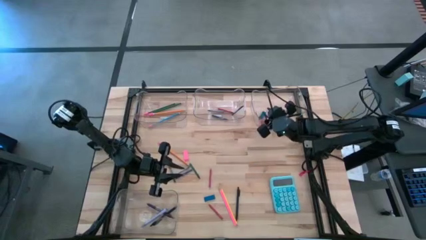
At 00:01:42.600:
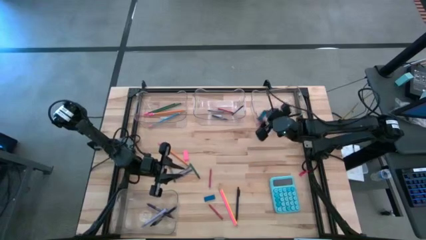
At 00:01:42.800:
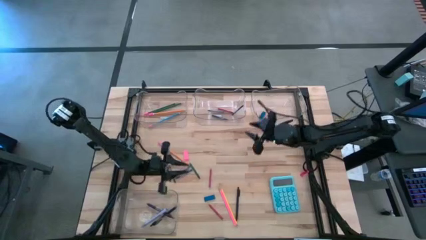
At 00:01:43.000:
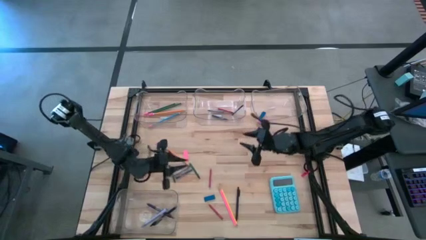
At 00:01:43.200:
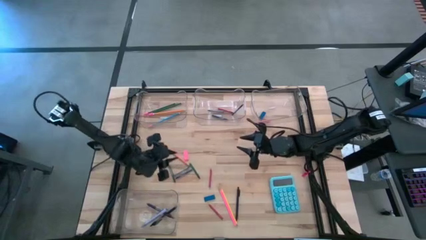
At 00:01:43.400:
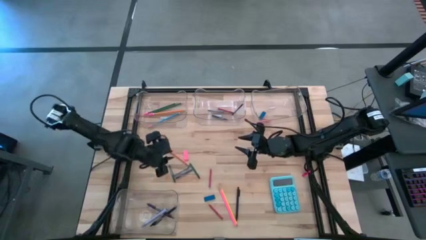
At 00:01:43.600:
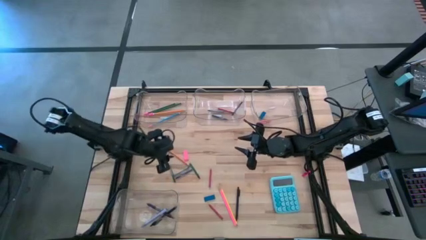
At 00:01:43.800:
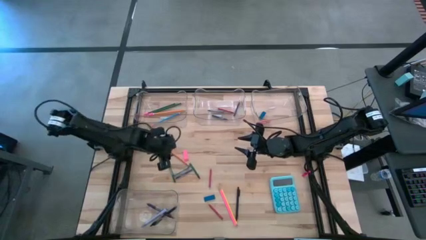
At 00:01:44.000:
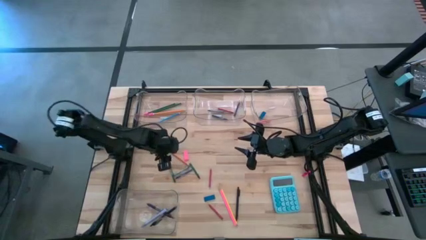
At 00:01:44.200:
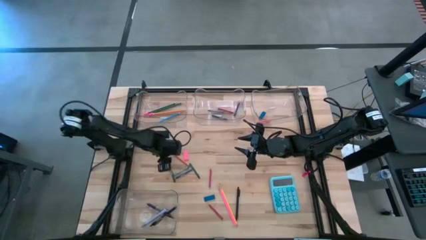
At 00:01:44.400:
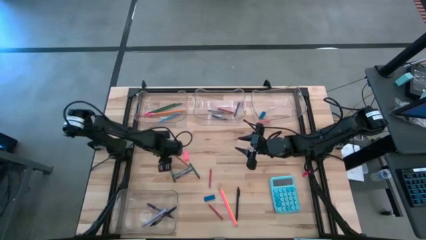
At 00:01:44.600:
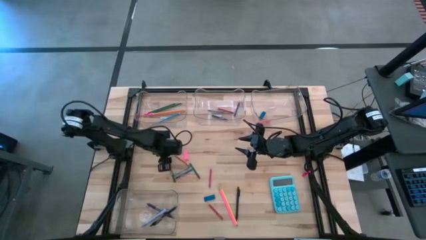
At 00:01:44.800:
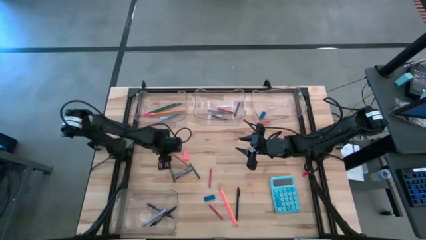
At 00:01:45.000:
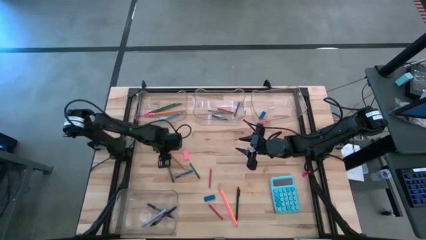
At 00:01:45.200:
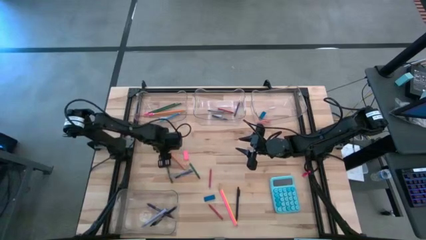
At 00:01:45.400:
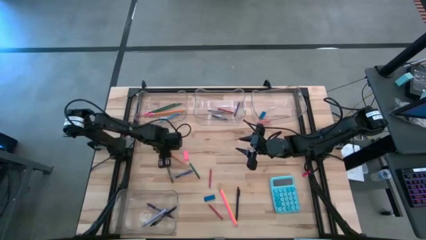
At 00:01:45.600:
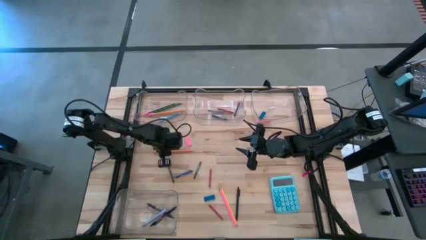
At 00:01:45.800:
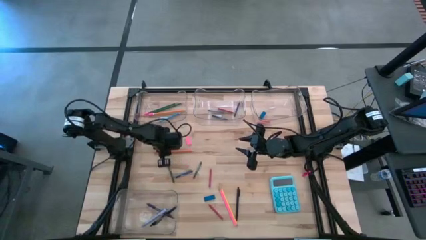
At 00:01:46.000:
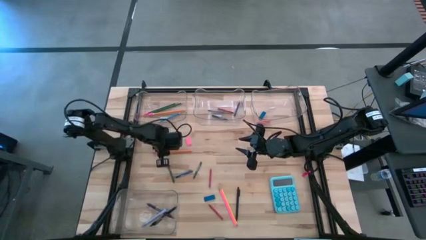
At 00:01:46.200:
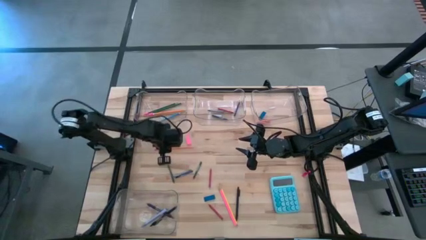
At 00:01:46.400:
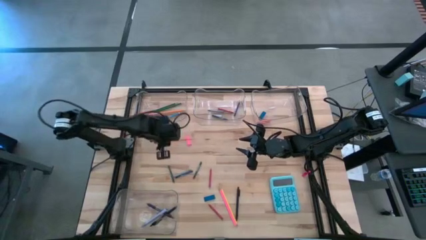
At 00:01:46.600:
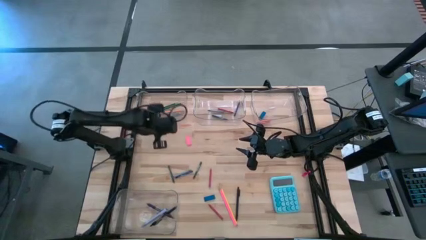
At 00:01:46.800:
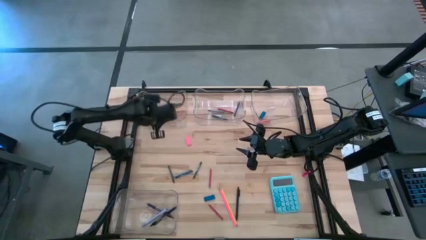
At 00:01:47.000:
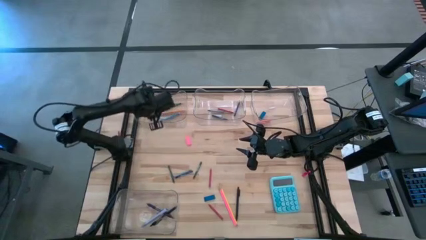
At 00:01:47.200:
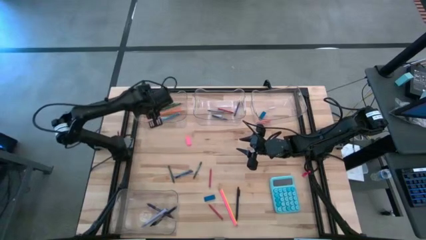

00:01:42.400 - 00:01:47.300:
Task: Sort crayons/erasers/pens/pencils in bins
Put the orange pencil into the top left transparent bin

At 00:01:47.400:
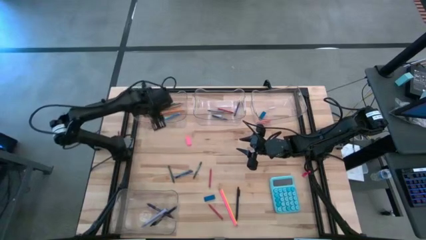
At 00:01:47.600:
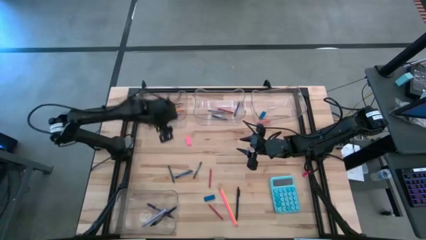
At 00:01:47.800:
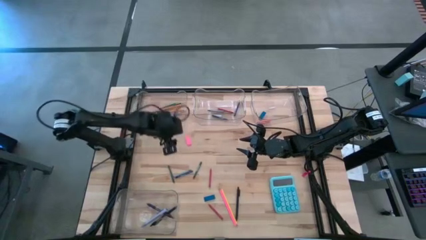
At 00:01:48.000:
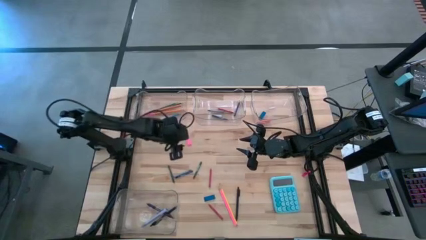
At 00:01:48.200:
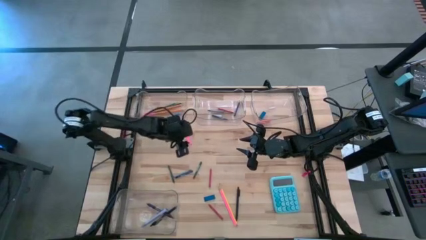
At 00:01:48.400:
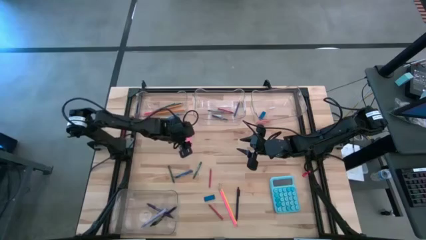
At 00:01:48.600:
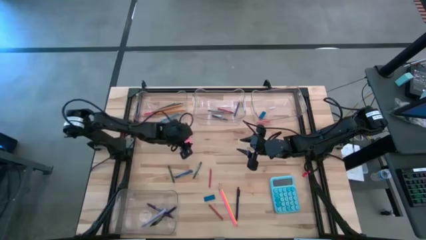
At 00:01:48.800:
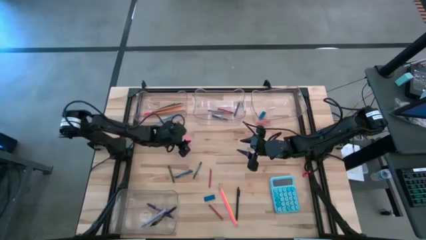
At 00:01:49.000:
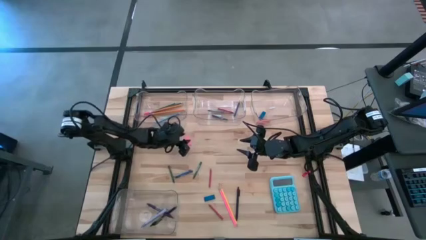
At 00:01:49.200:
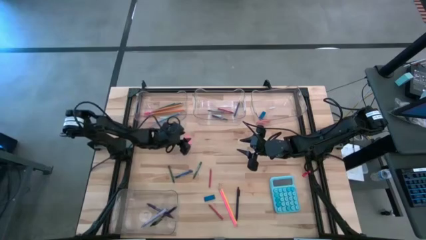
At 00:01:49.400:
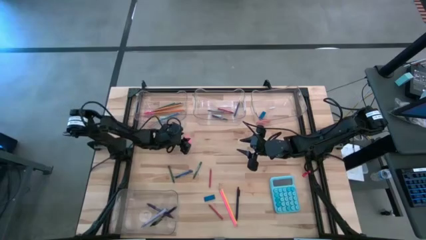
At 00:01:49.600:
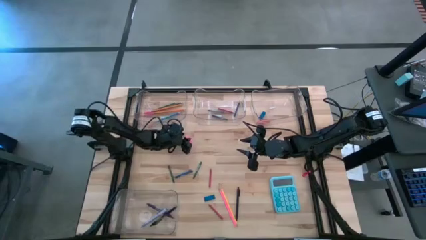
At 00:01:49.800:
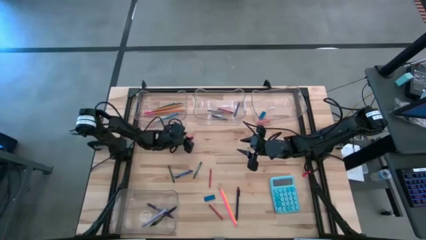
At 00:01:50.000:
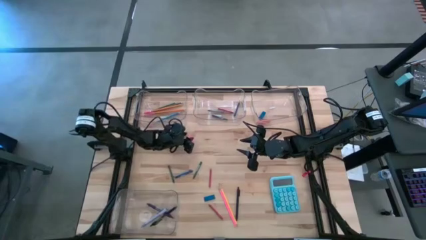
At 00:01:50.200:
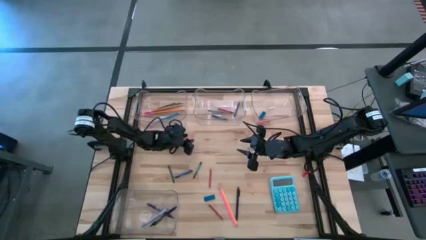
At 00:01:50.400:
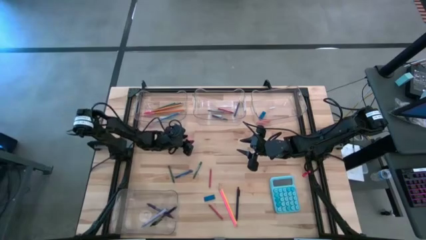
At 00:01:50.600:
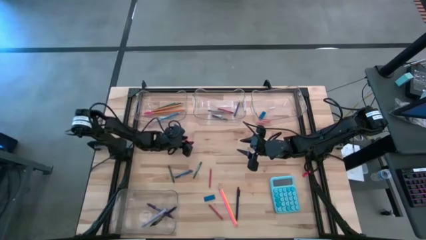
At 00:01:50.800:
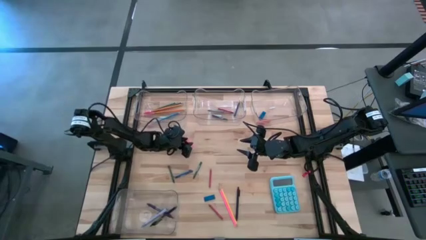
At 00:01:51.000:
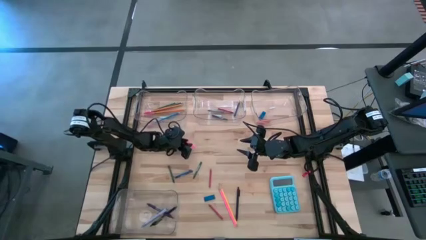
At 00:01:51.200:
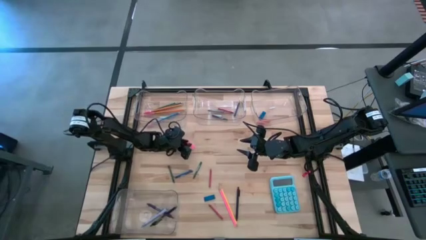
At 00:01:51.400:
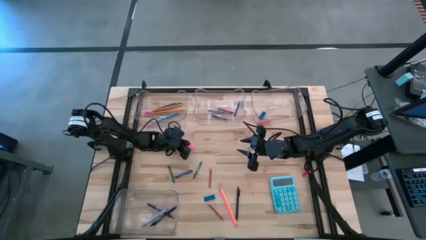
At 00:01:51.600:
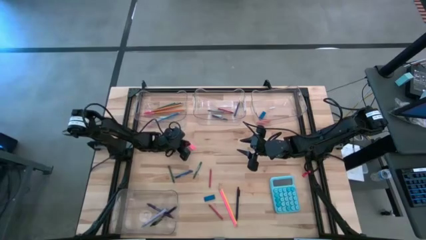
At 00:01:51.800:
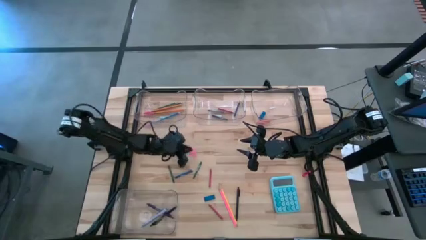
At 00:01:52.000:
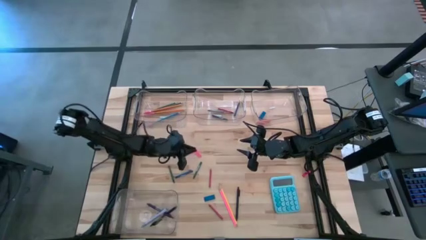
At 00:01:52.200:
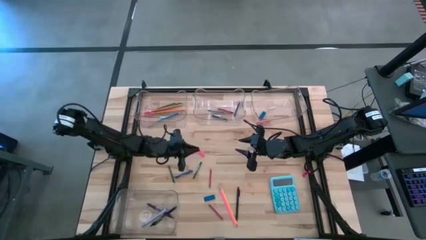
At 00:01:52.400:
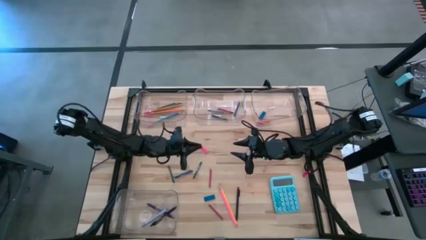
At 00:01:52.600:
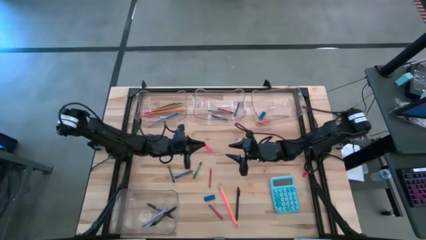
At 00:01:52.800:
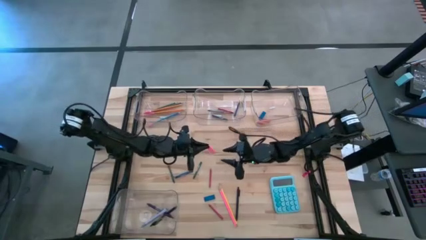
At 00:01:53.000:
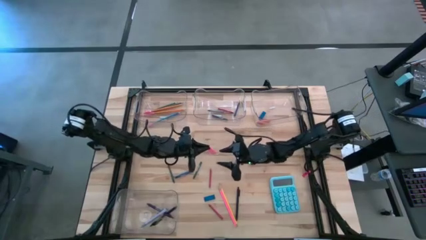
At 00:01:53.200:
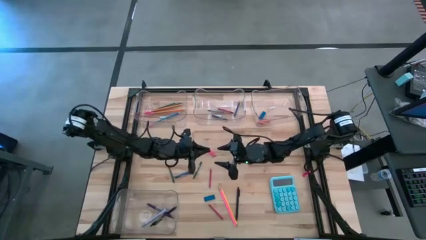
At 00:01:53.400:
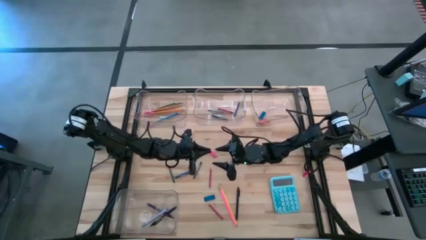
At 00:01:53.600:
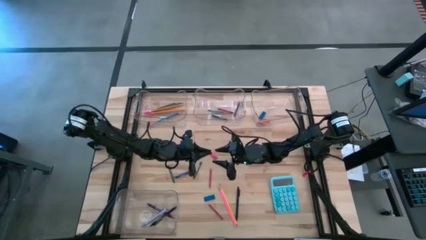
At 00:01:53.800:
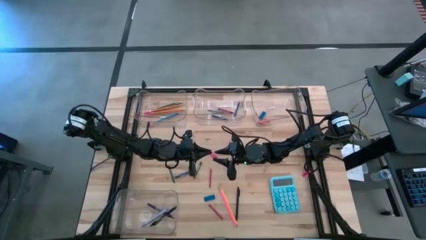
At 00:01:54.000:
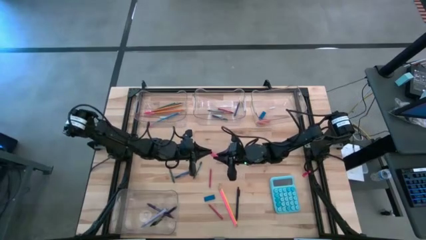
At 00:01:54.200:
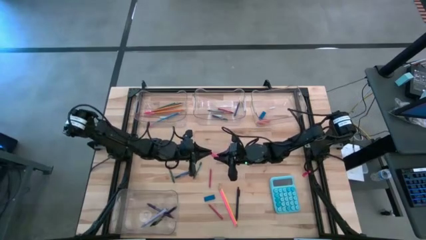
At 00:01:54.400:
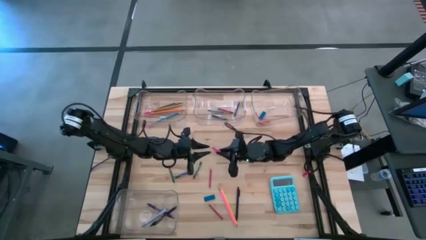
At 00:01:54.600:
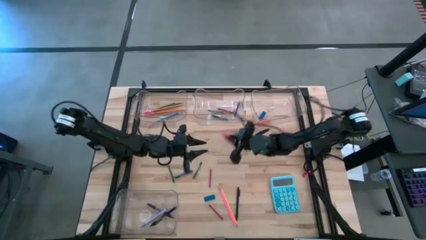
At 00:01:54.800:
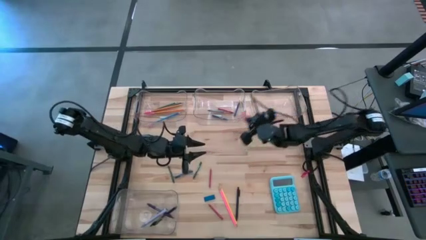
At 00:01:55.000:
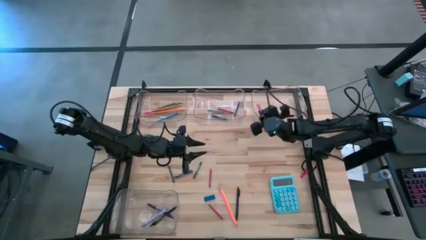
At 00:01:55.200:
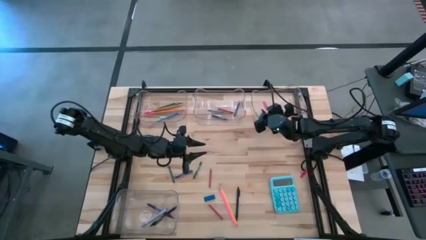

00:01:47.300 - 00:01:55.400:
Put the pink eraser into the top right transparent bin

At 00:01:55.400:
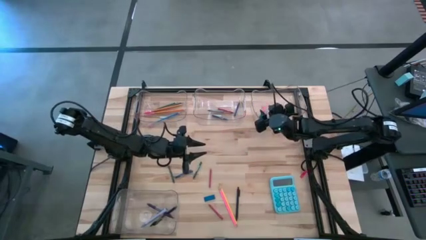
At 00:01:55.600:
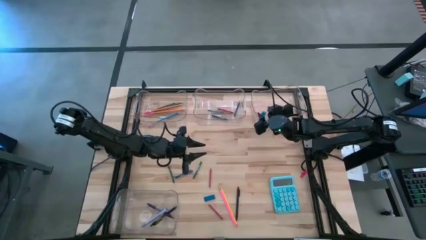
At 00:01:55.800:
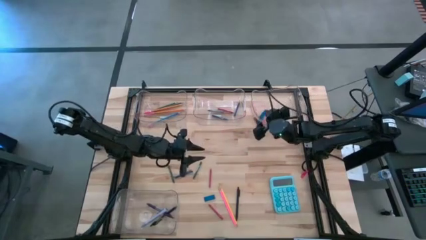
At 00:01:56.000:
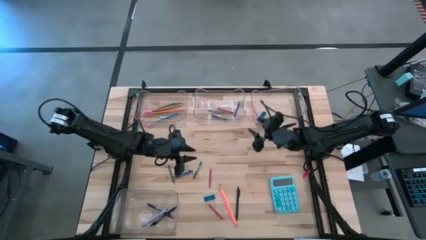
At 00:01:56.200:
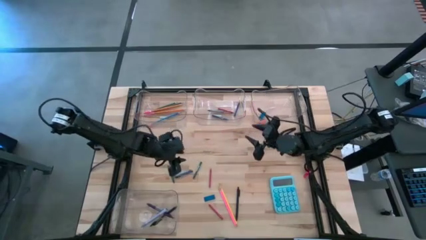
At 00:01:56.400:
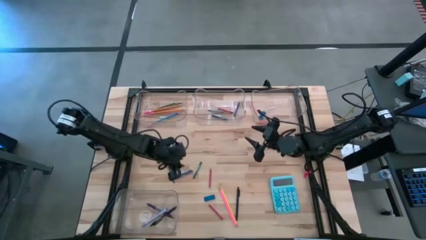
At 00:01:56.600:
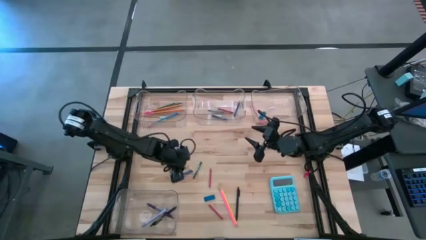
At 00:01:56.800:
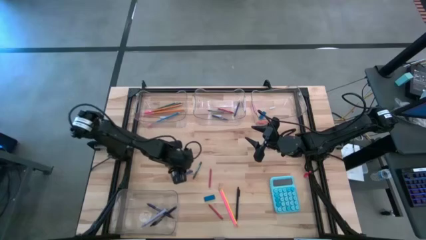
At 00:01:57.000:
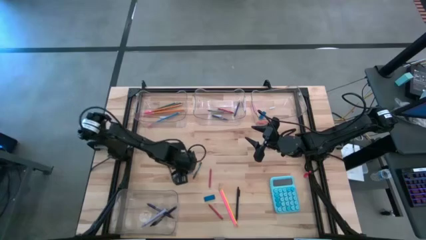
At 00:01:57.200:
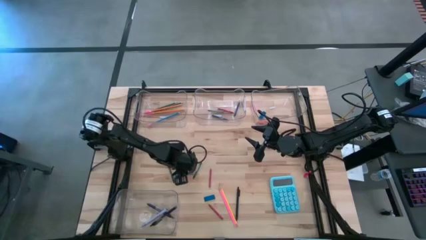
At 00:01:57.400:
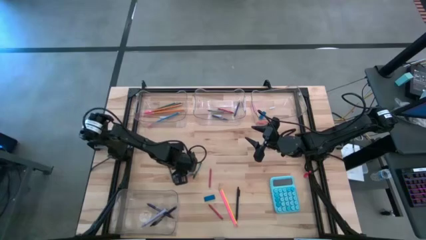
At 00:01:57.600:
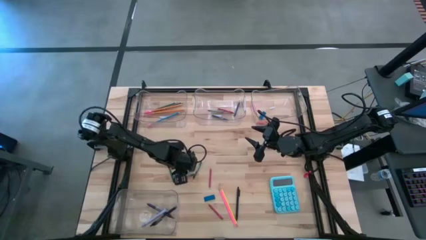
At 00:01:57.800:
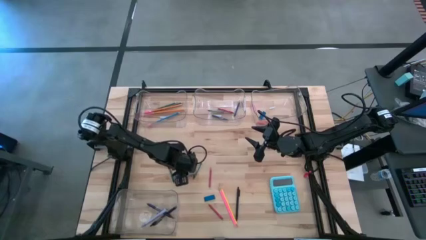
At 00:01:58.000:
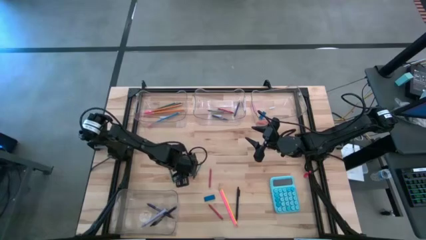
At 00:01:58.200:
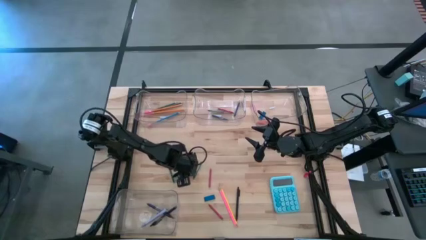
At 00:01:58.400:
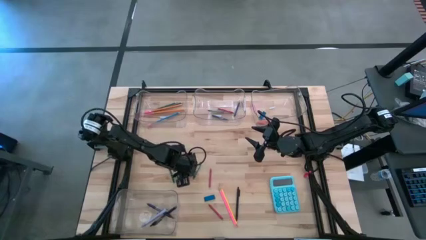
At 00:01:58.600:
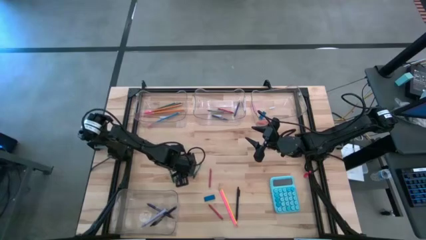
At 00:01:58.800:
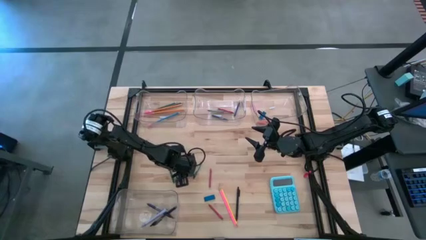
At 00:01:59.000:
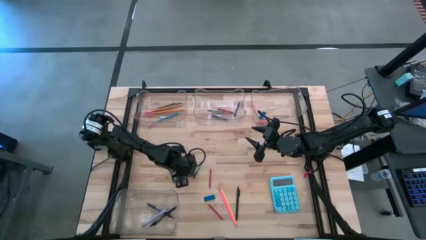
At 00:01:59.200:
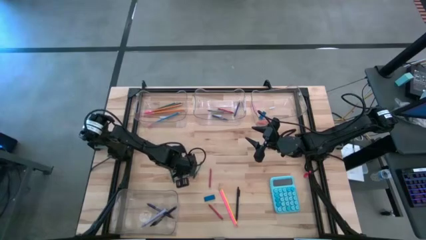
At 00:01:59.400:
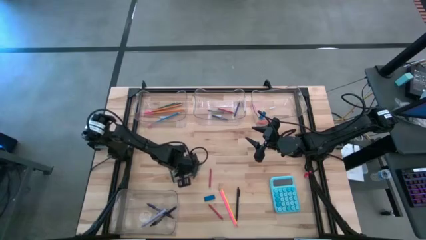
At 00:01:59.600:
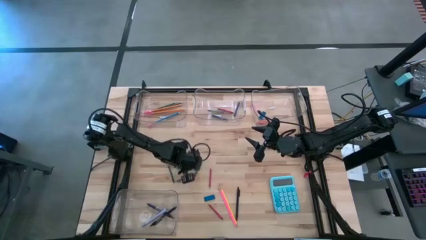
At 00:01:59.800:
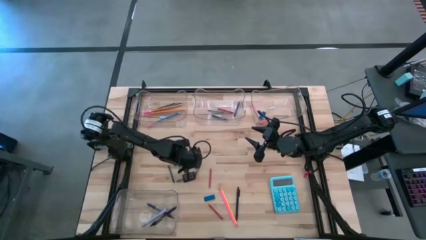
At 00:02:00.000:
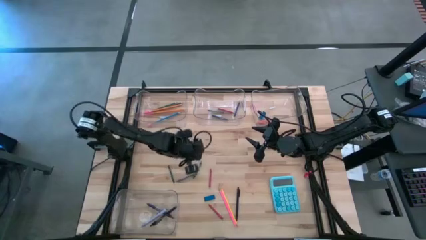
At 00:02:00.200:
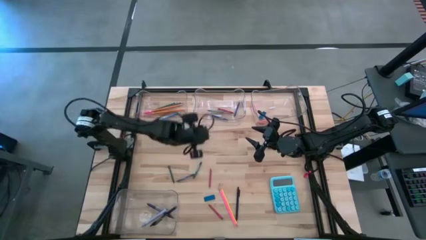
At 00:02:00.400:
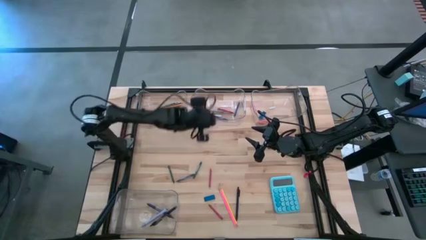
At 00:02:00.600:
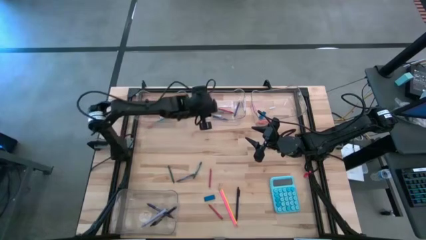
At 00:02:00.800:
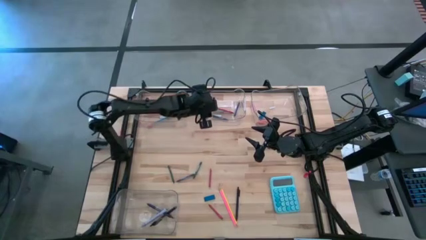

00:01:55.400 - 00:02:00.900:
Put the gray crayon into the top middle transparent bin
